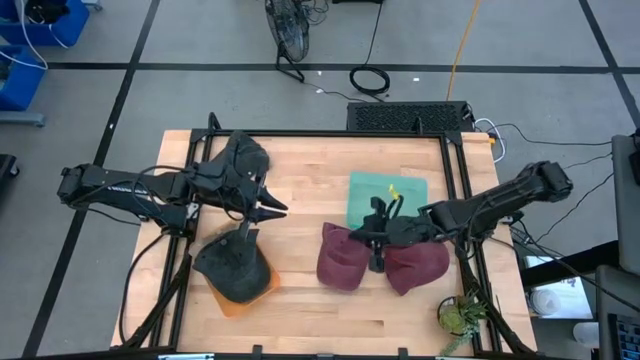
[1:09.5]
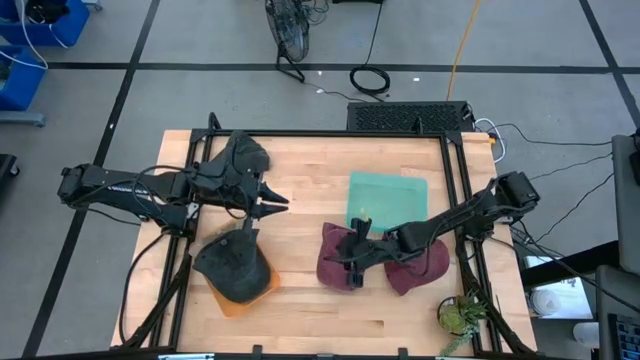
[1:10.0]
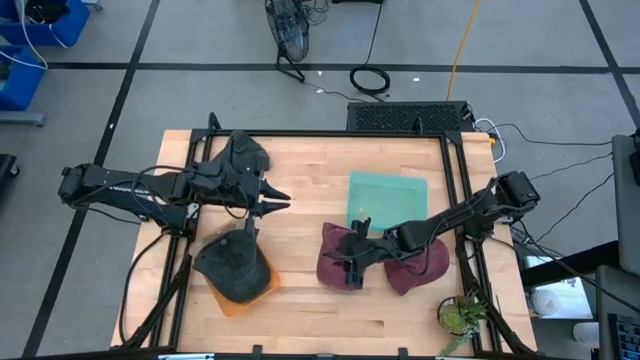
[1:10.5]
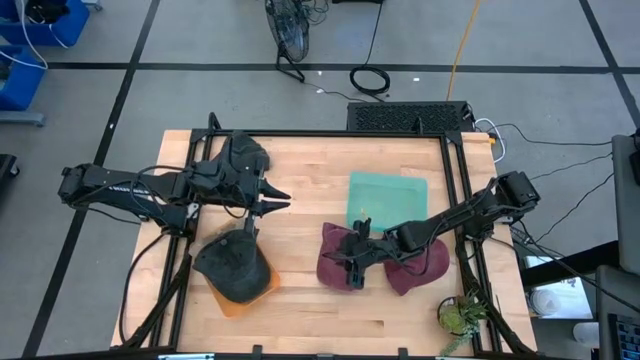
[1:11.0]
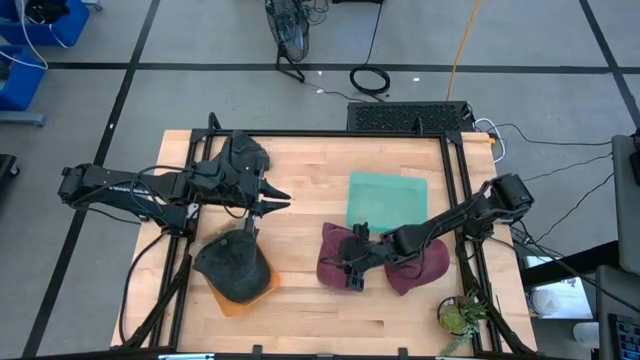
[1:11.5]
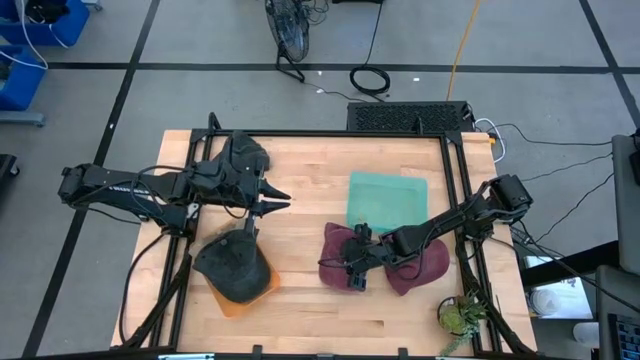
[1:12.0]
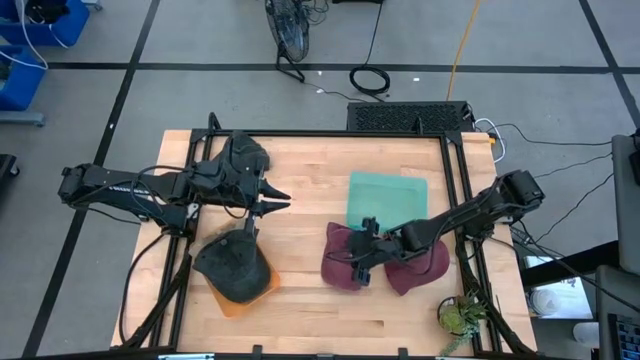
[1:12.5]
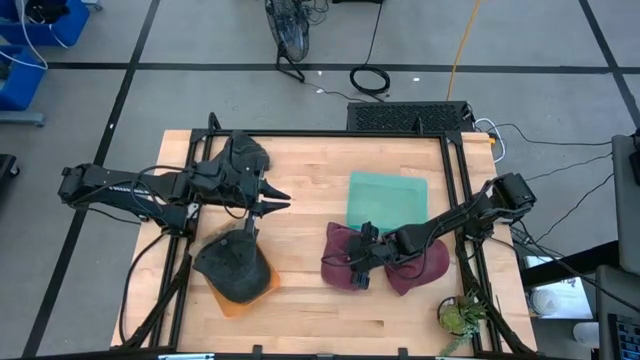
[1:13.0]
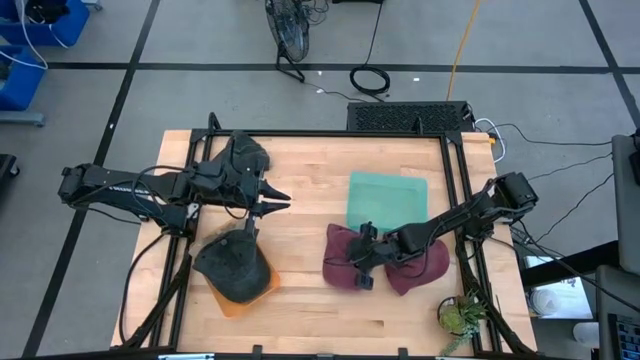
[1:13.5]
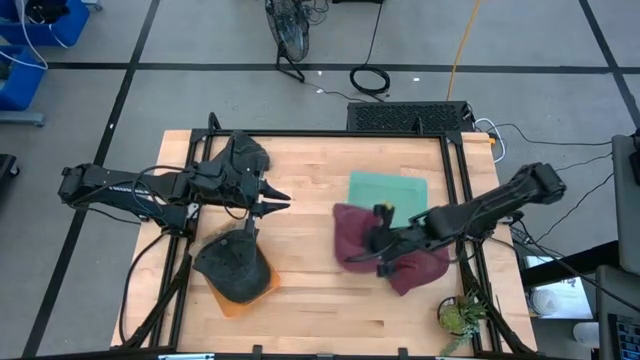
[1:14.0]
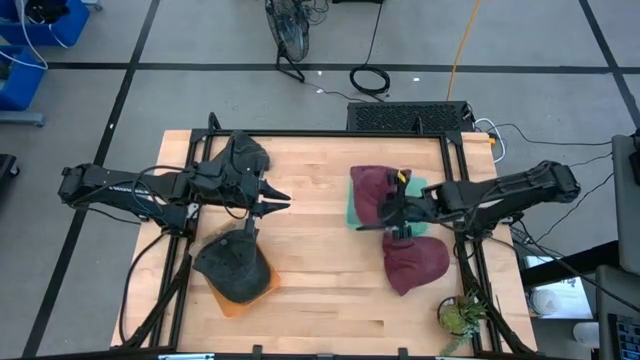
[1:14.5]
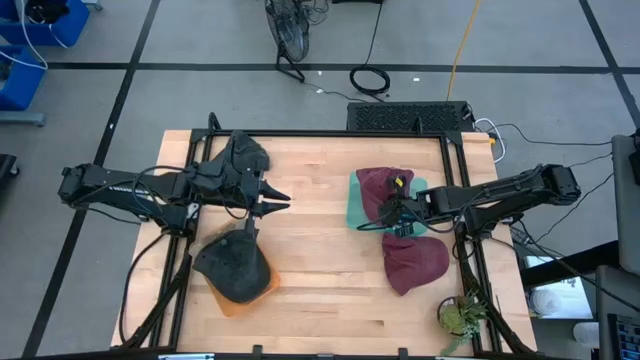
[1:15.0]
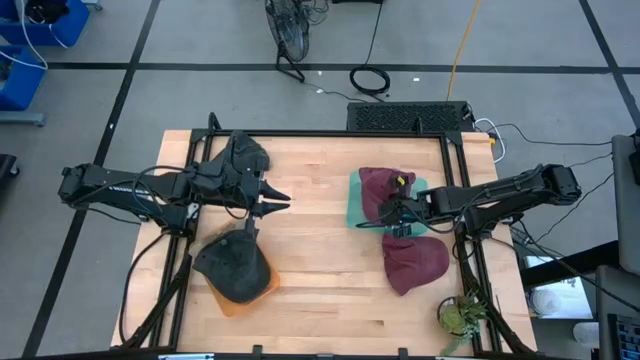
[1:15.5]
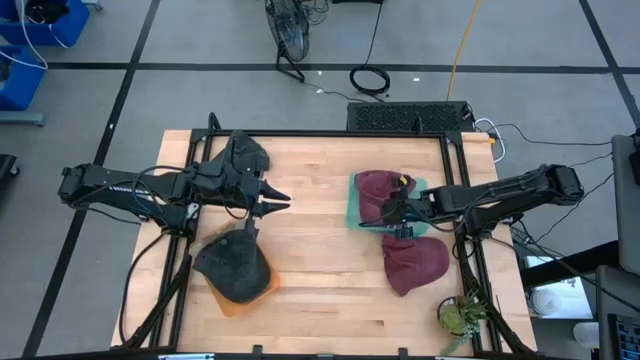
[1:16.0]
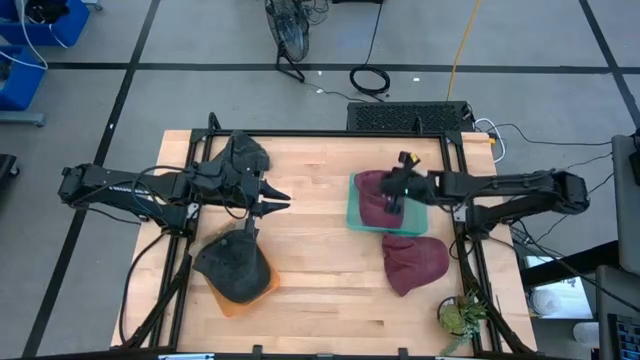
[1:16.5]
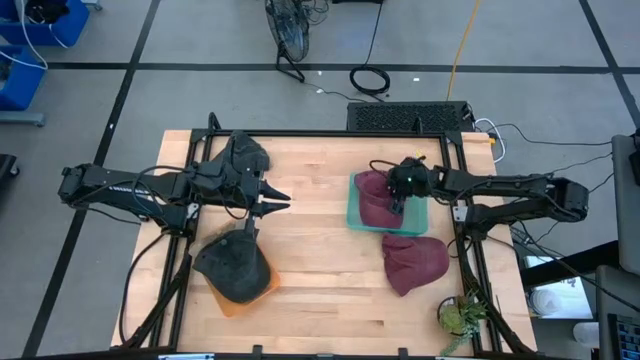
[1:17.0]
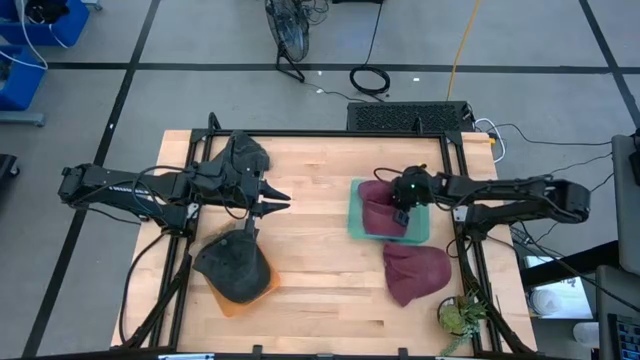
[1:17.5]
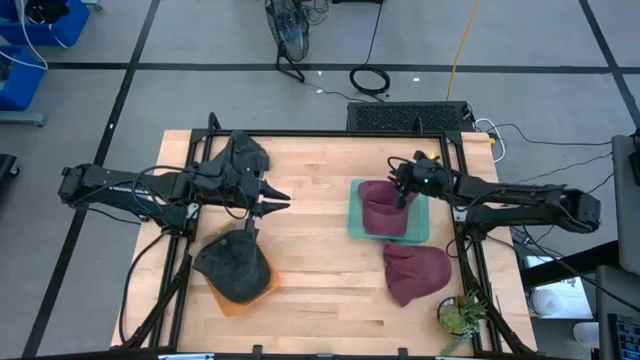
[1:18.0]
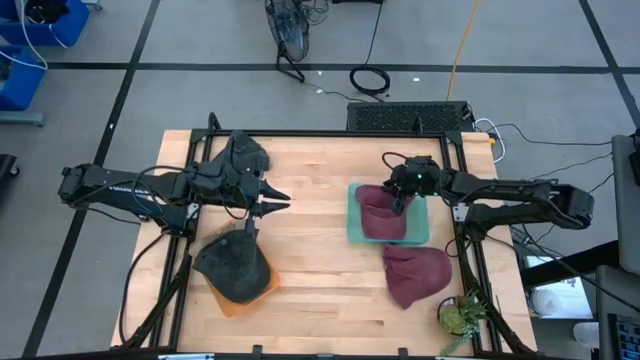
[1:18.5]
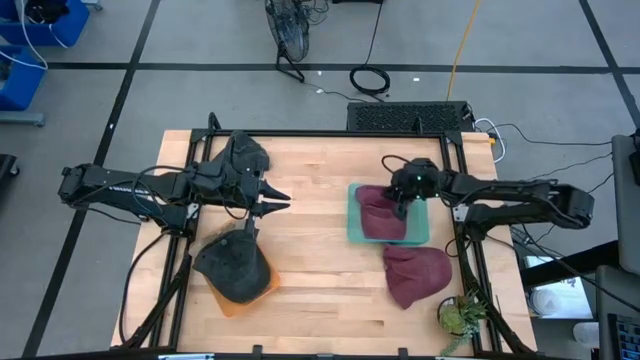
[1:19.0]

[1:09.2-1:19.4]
Task: Pick & Place hat
Put the left red cap into the blue bin

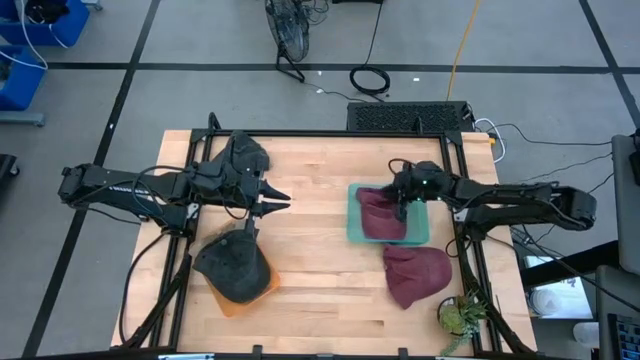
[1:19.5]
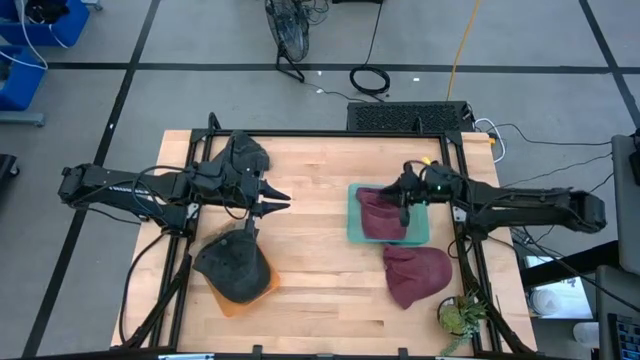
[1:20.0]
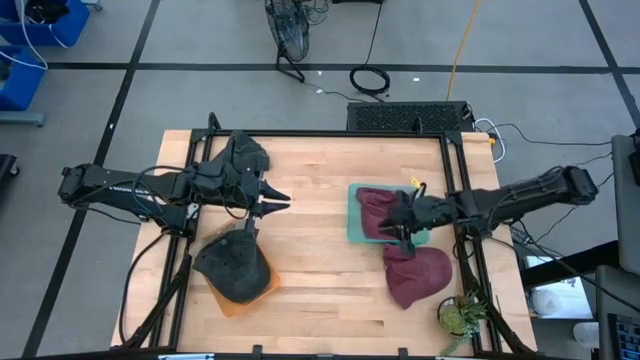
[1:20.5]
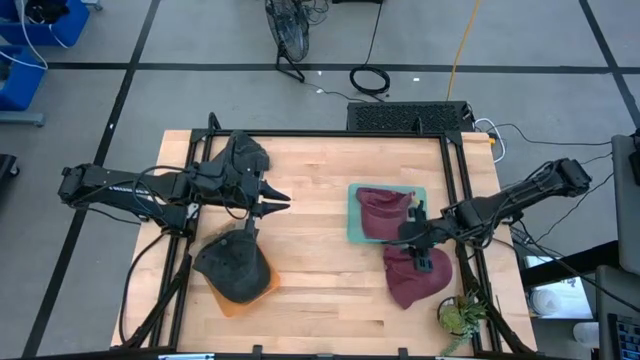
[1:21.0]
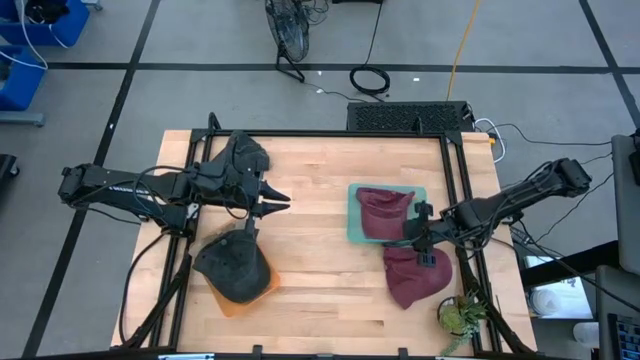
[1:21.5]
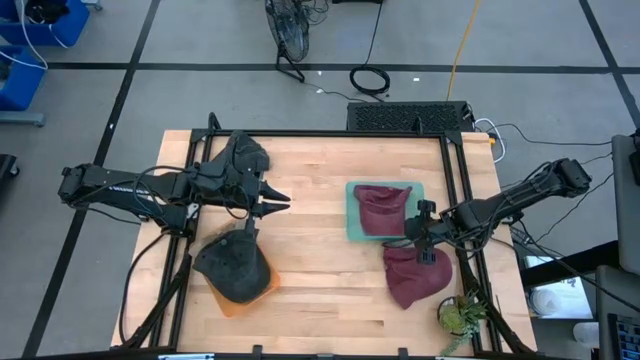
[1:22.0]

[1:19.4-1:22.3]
Adjust the blue bin

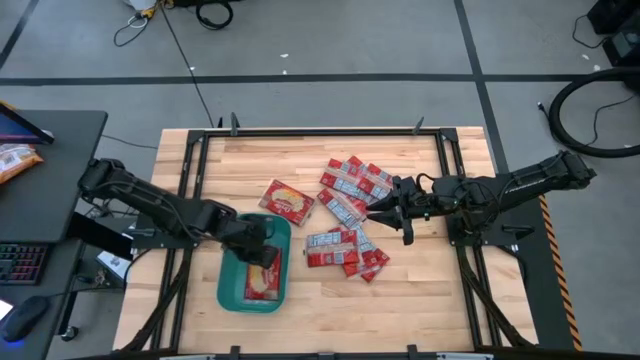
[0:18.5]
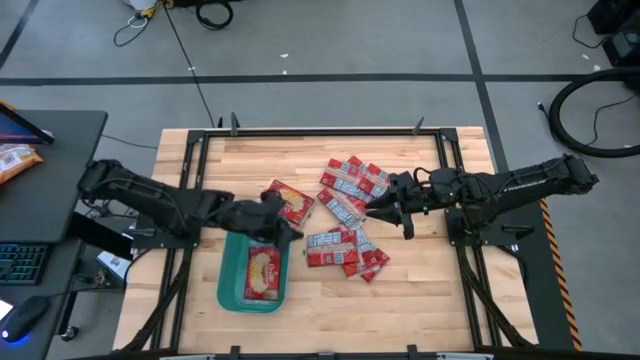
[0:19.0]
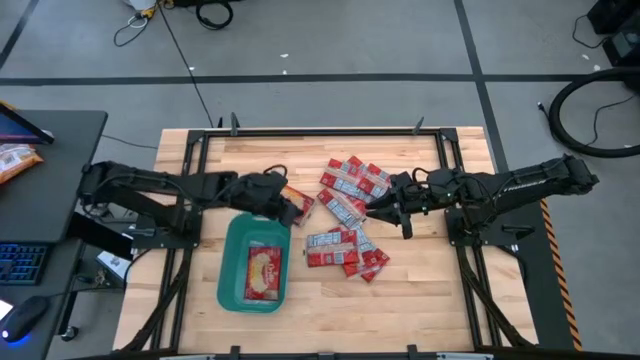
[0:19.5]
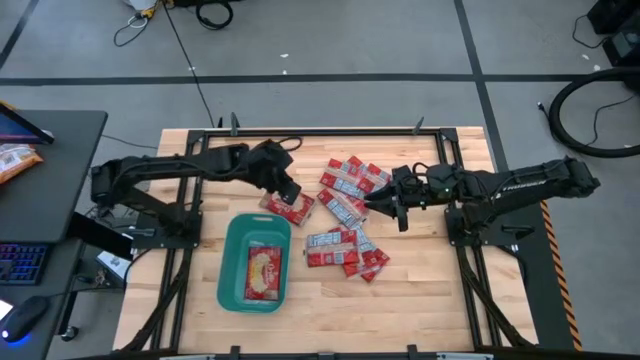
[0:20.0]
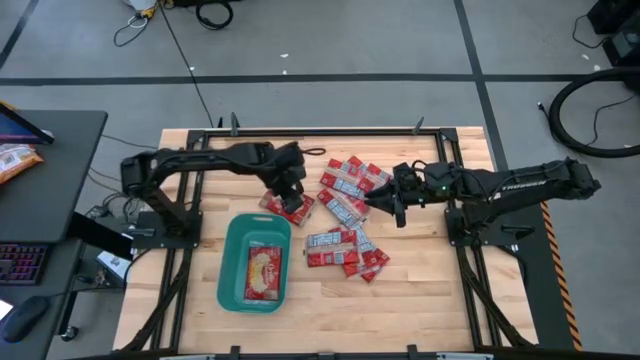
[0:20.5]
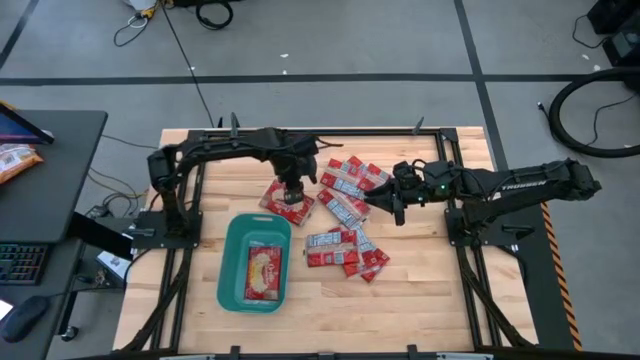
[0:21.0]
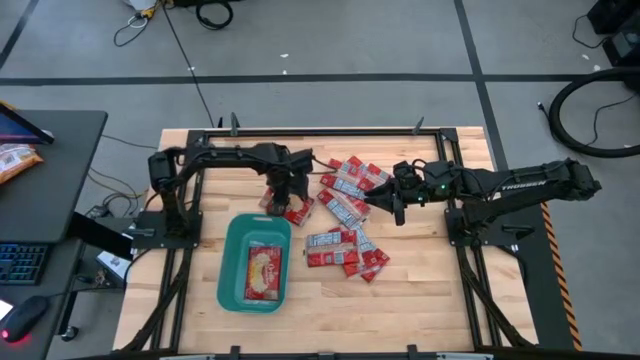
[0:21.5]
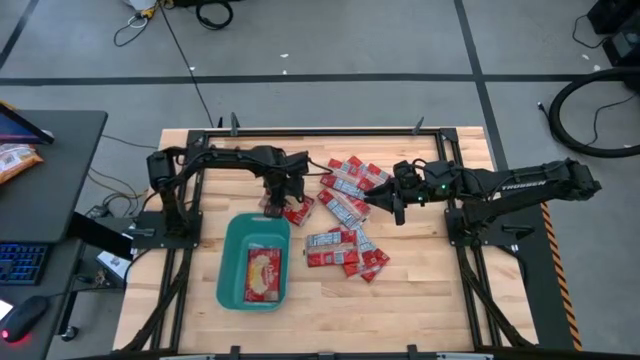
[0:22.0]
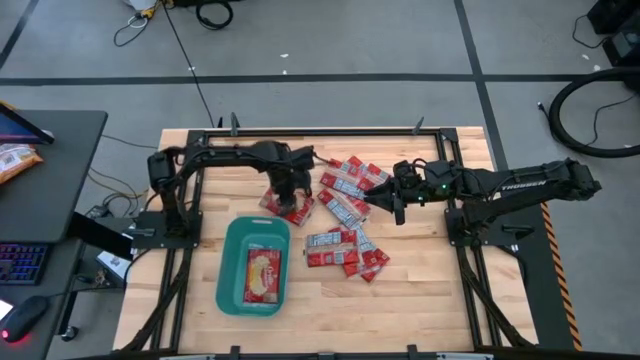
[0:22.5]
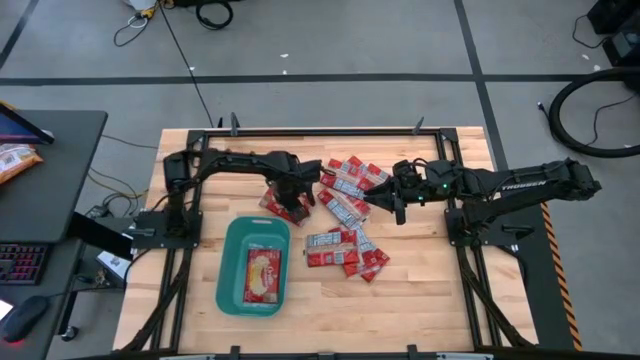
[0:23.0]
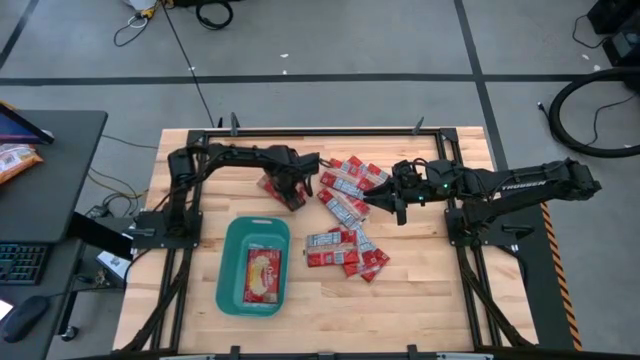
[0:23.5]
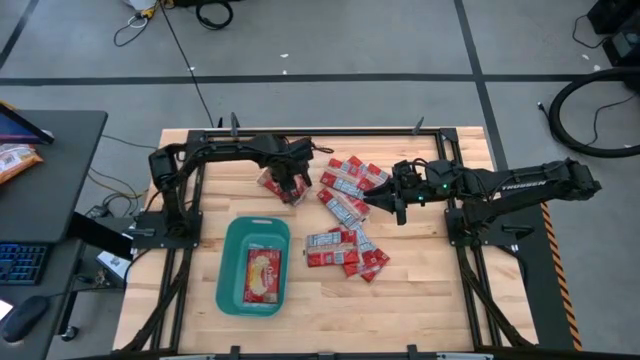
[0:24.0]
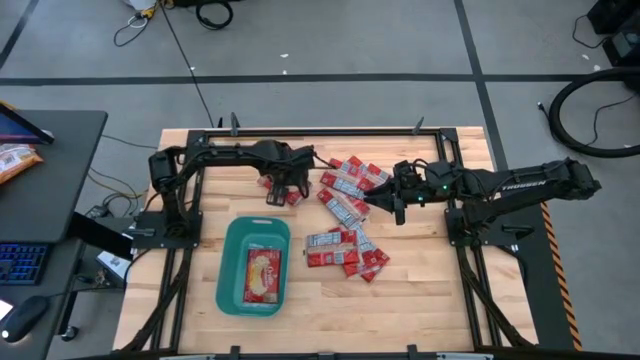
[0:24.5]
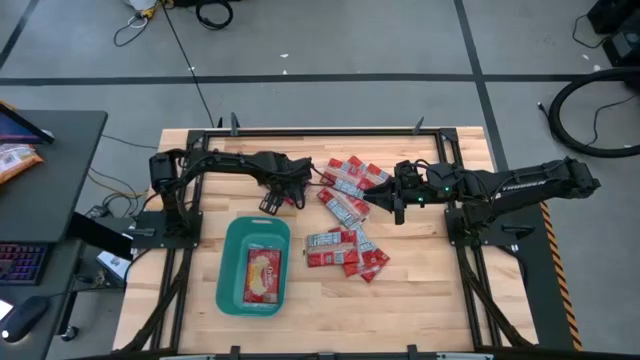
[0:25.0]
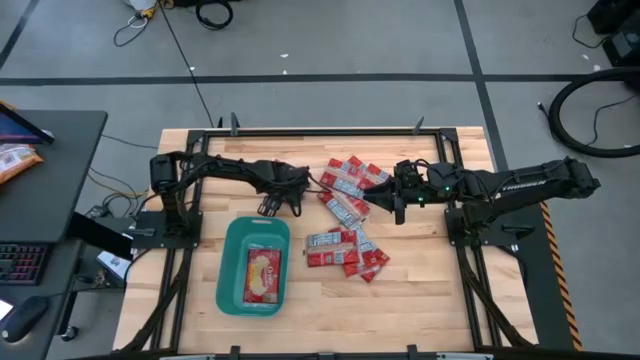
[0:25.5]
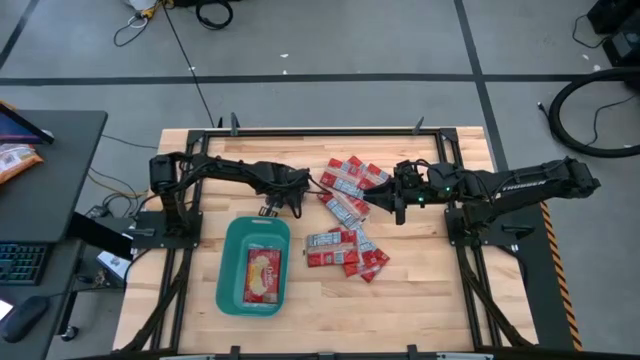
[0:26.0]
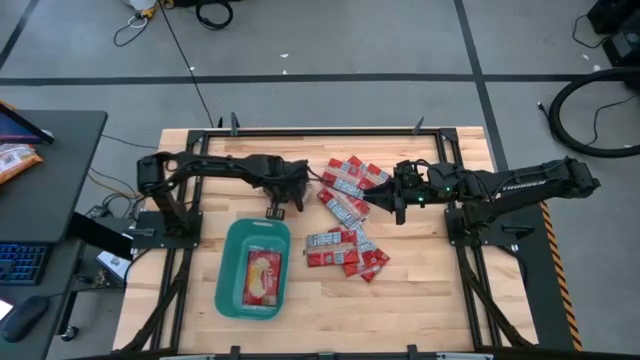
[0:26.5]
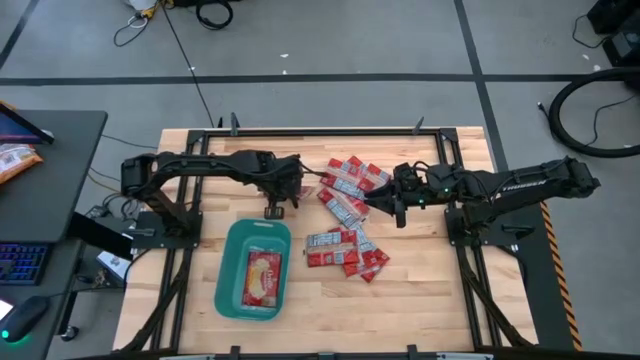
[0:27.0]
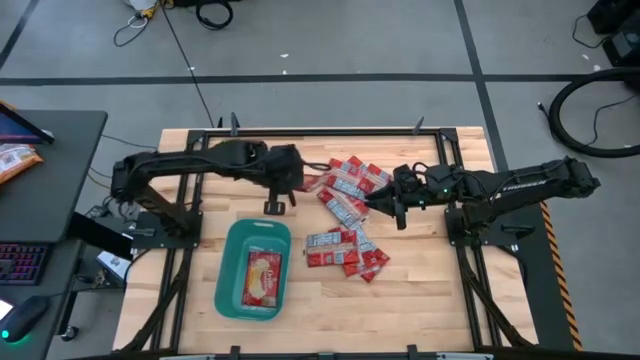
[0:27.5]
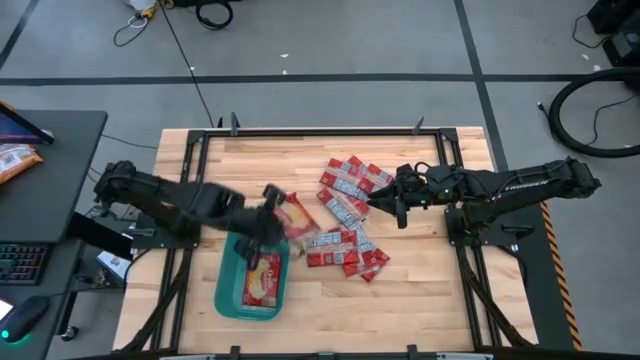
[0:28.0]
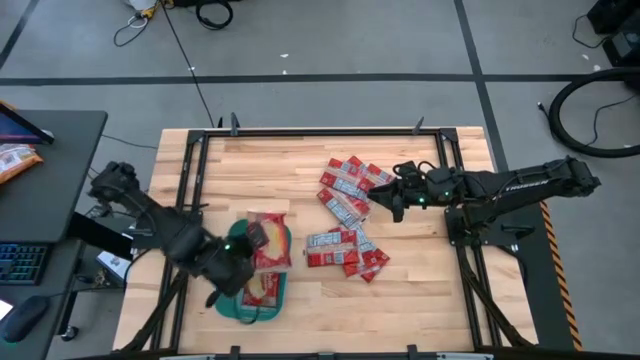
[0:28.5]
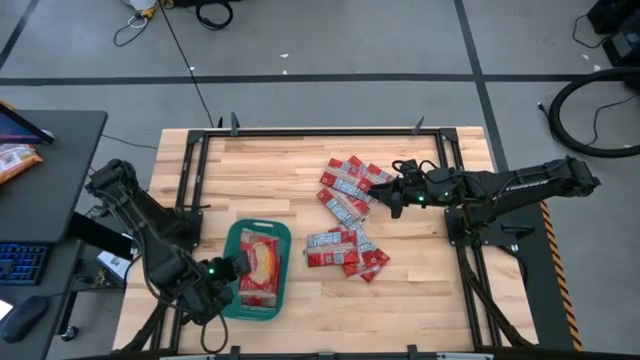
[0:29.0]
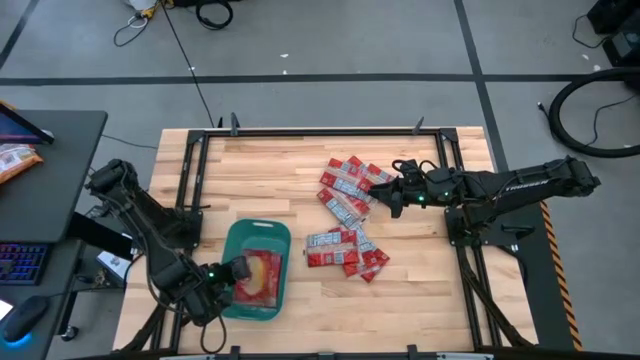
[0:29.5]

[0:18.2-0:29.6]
Task: Sort popcorn bags into baskets
Put the red popcorn bag into the green bin
